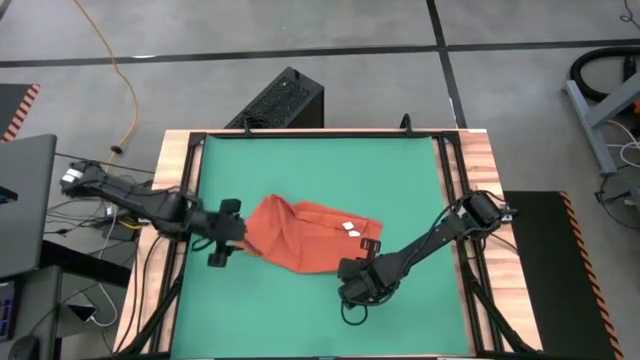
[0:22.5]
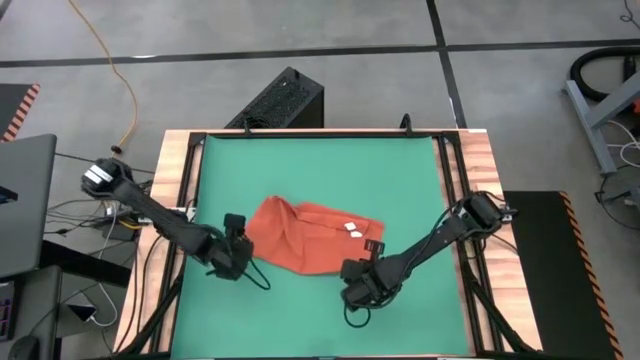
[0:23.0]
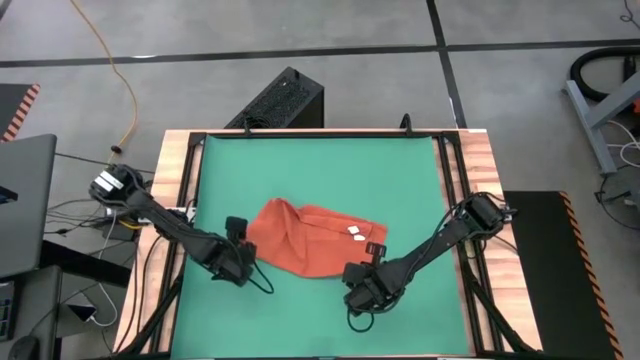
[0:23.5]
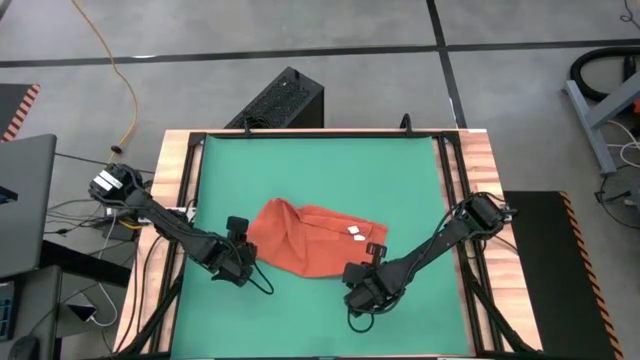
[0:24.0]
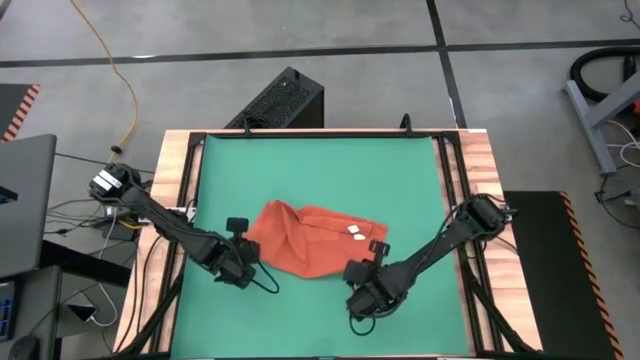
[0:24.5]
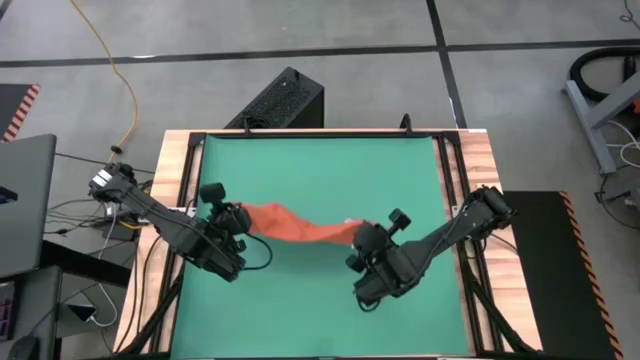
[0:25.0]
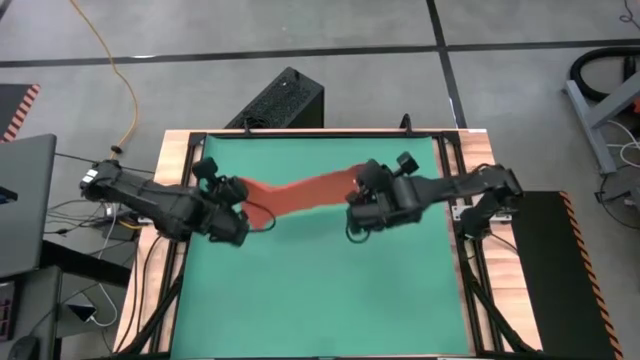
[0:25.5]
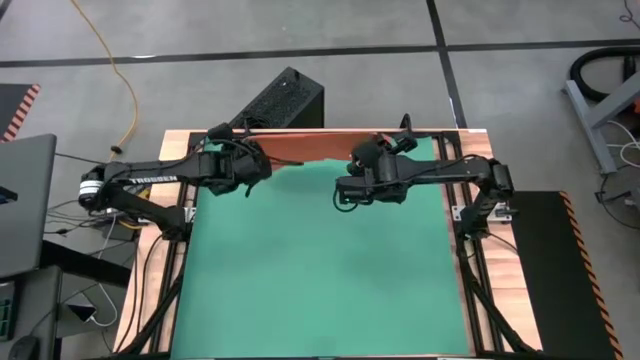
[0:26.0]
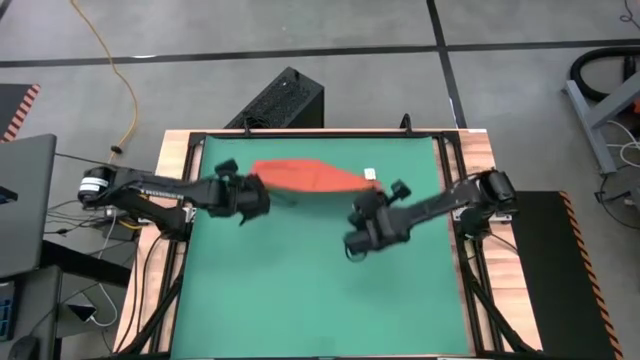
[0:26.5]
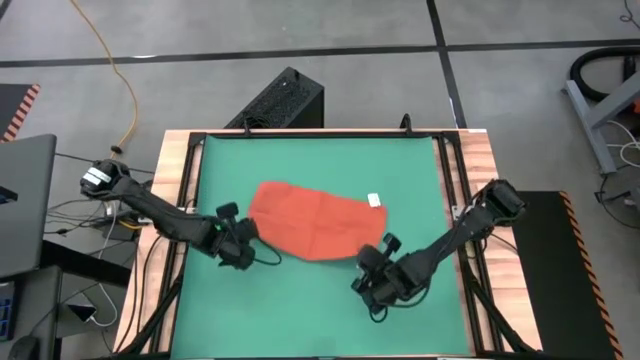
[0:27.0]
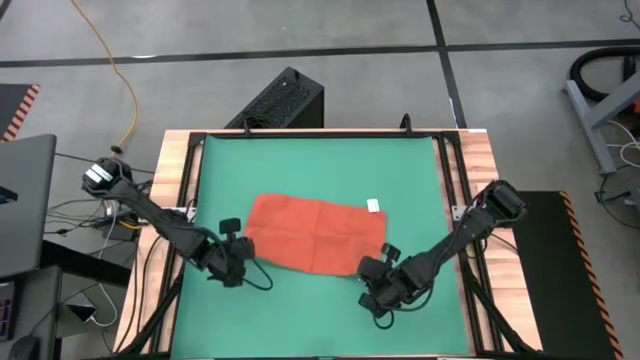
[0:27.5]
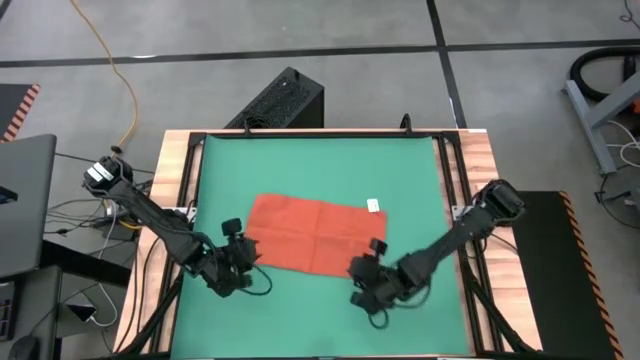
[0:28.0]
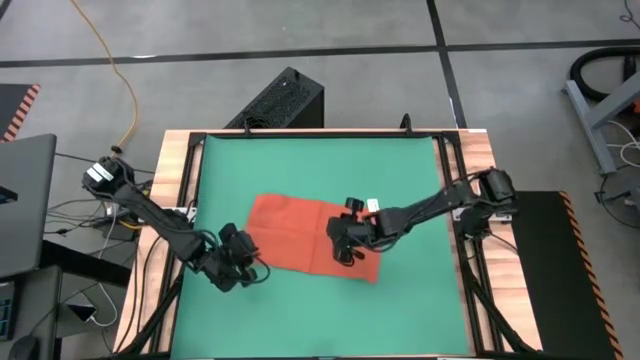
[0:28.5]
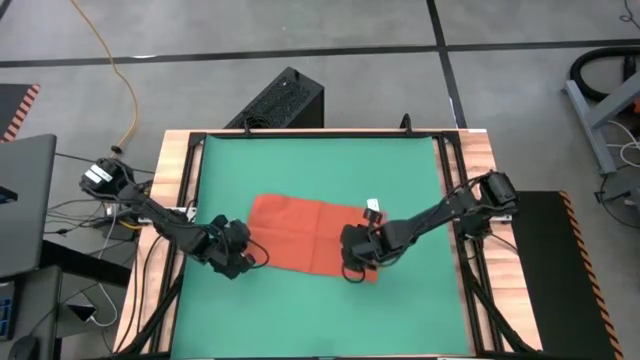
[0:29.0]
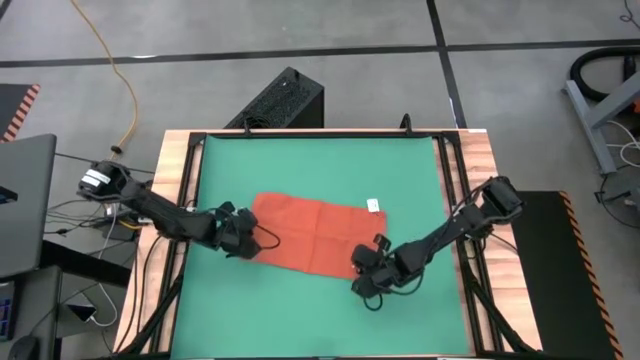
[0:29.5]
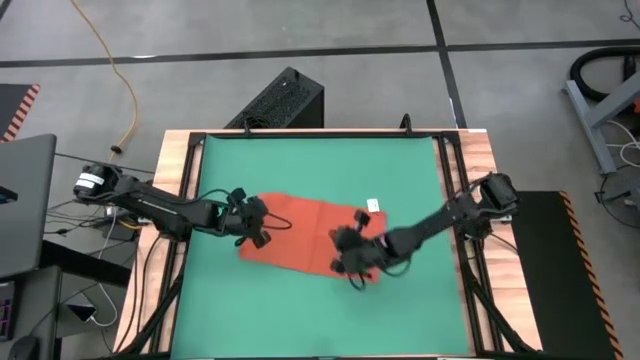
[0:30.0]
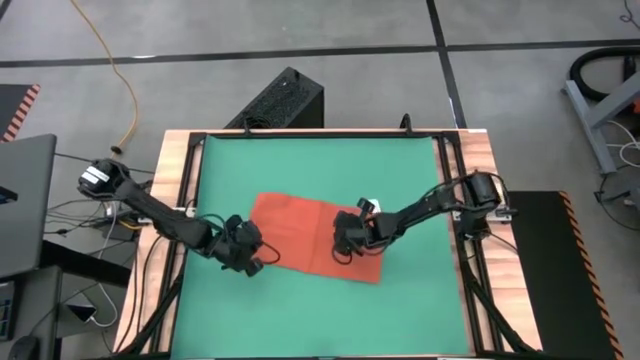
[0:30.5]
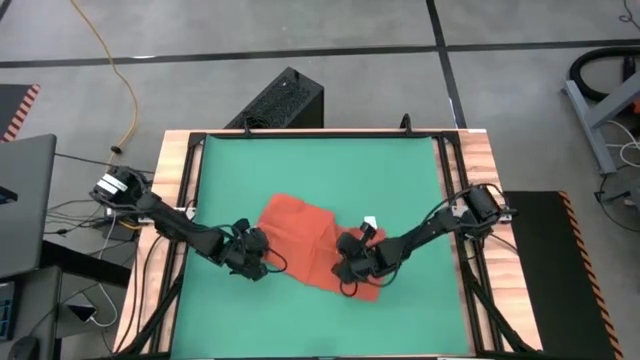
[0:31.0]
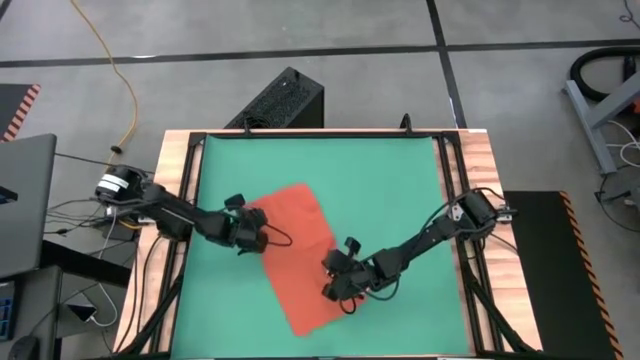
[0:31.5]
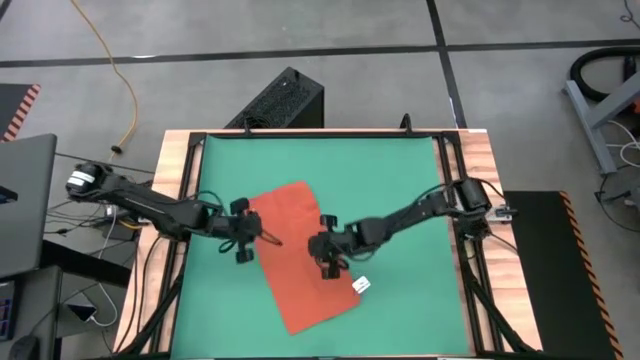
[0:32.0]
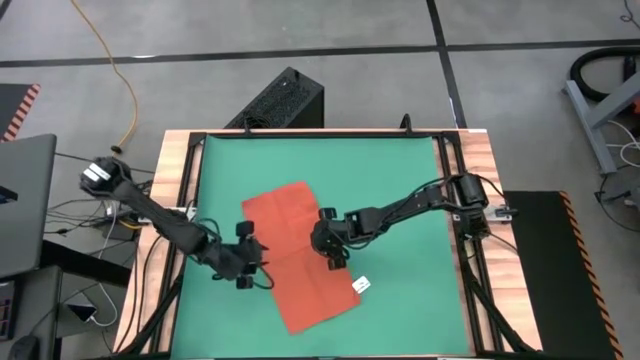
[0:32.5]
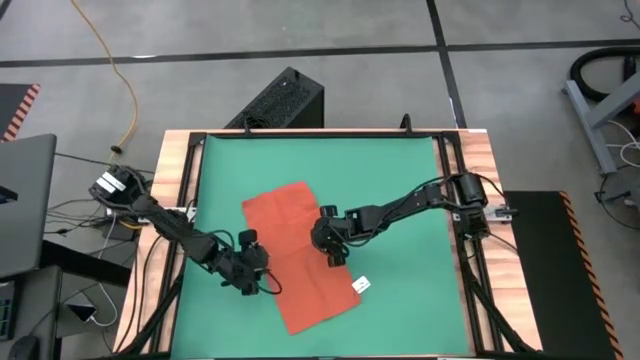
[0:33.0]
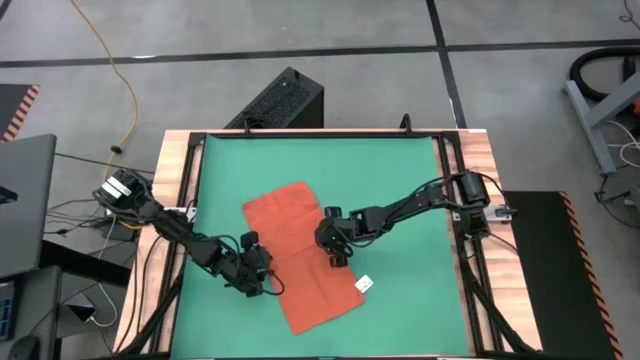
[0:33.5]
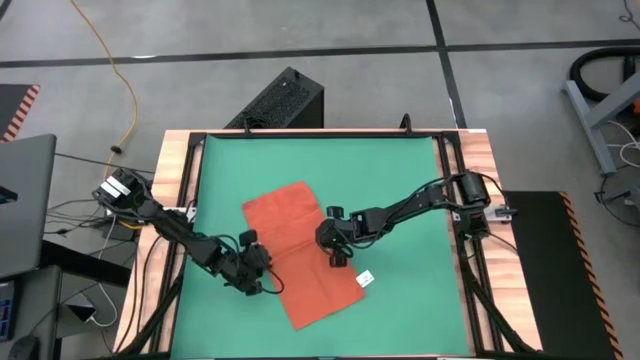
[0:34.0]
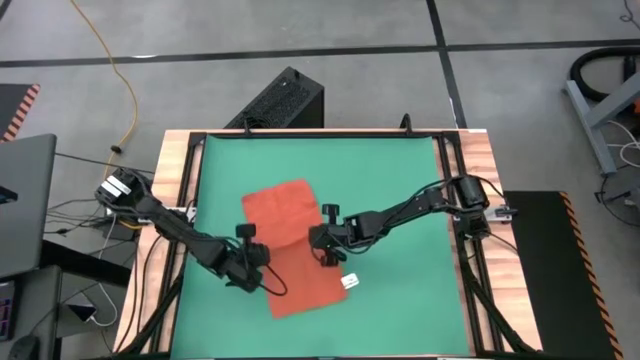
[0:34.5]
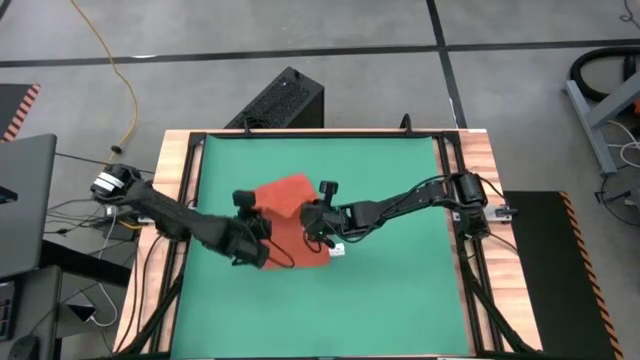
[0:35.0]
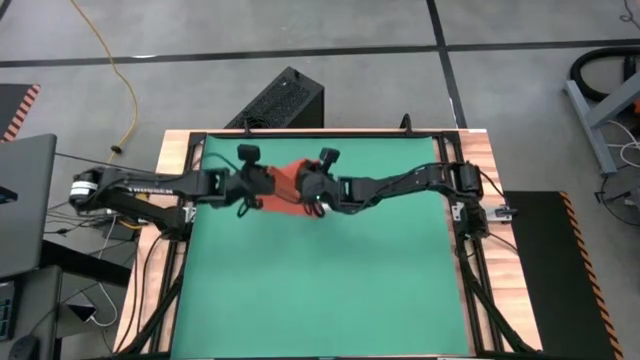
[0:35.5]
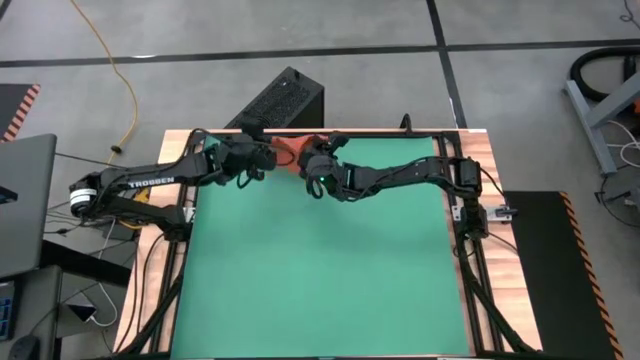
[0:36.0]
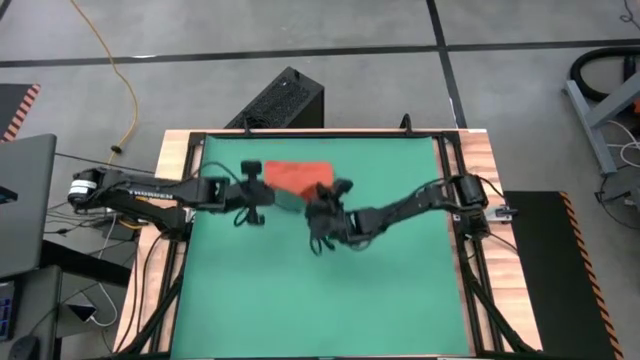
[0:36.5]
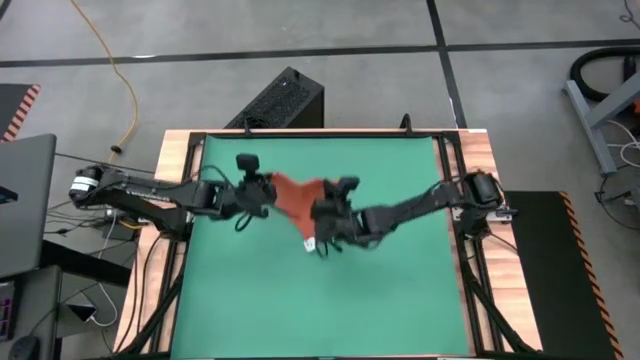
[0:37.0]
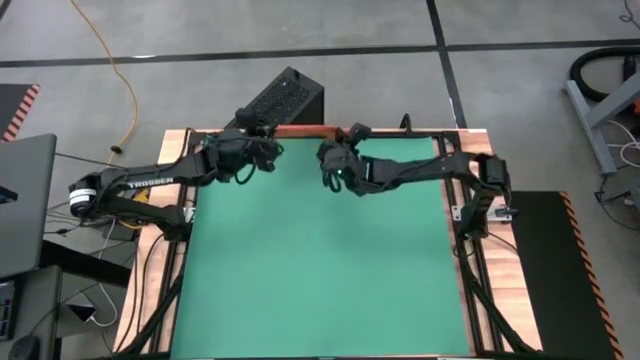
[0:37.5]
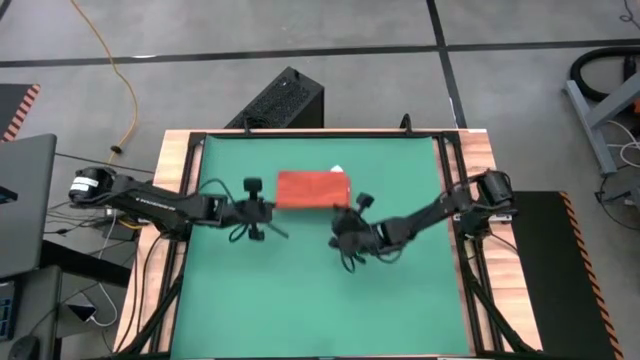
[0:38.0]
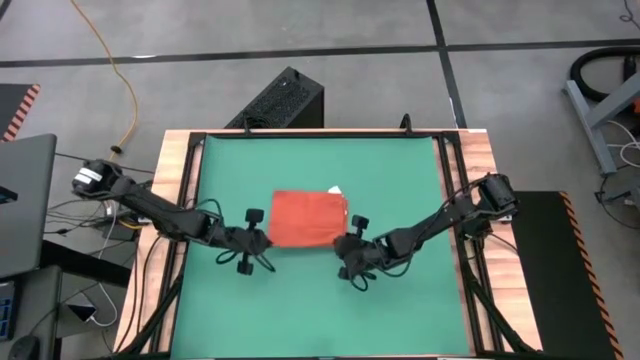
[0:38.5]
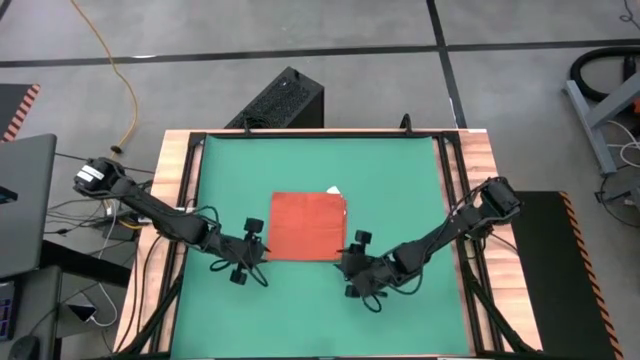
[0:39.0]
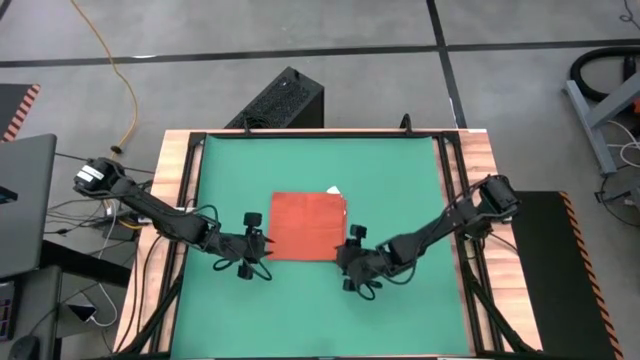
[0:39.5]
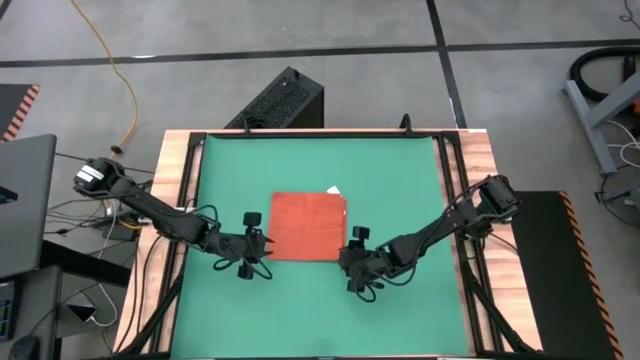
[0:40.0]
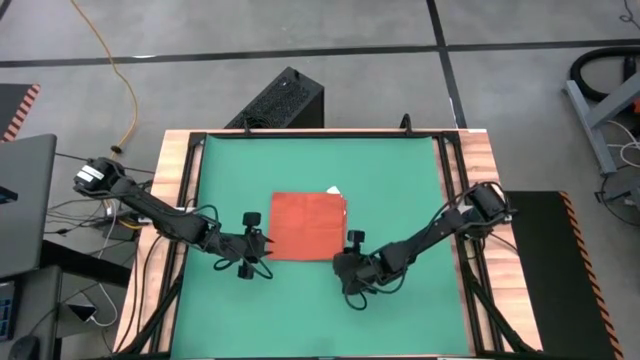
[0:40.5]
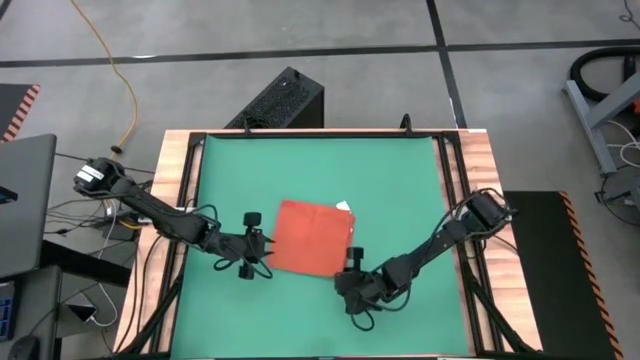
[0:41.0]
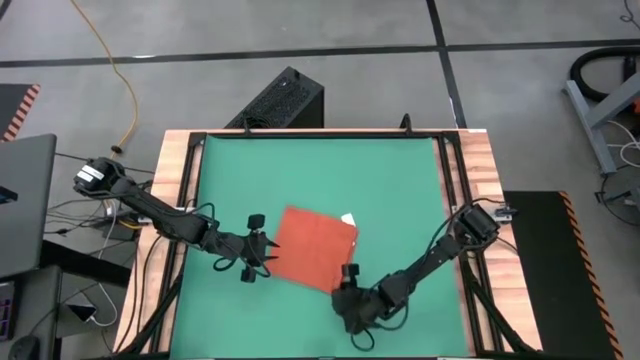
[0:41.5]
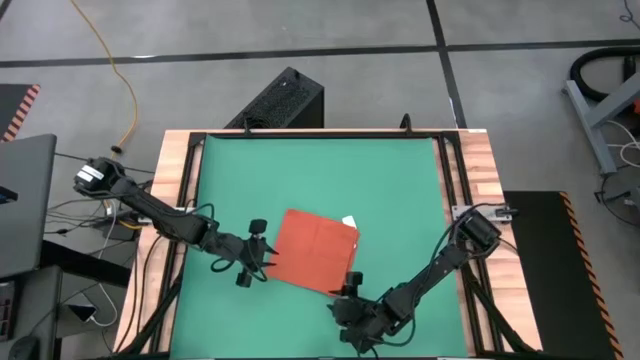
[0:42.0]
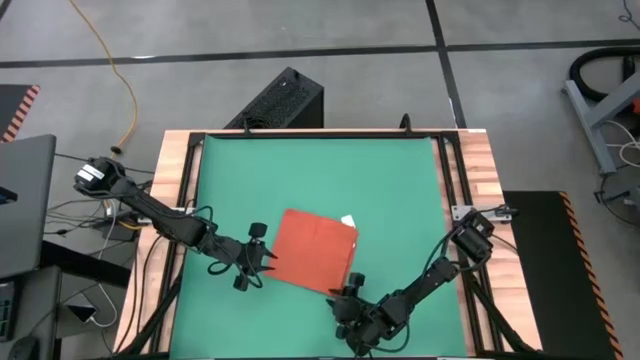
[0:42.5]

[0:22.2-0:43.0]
Task: Roll towel into tight, uniform cylinder
Roll the orange towel

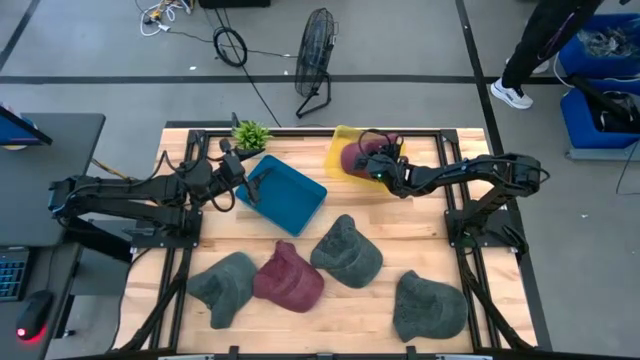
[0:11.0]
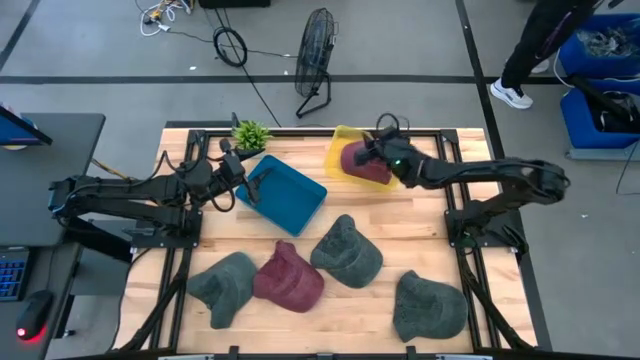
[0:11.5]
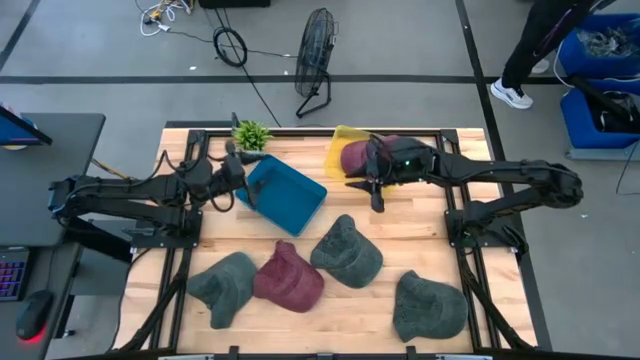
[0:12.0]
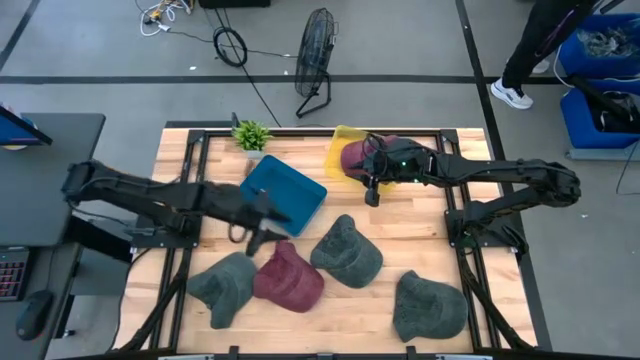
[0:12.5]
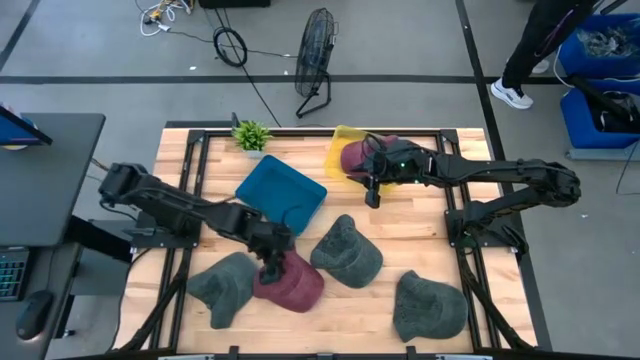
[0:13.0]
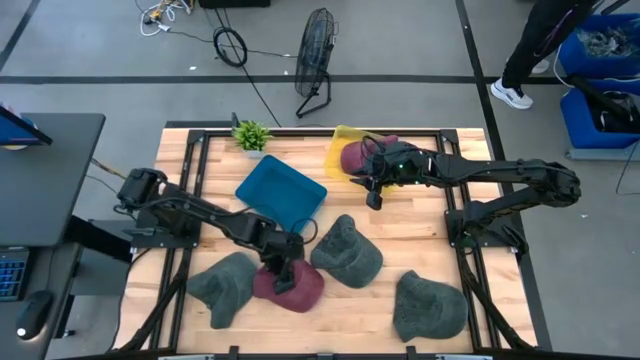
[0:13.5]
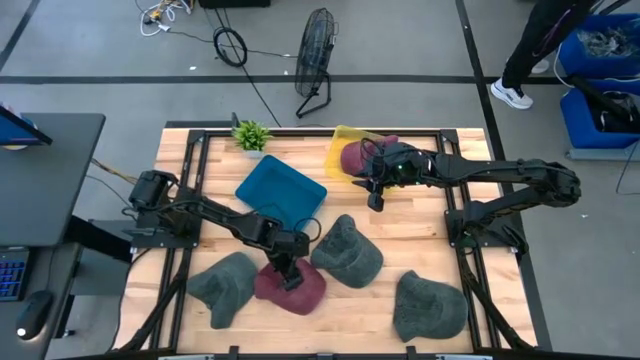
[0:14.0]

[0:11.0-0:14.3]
Task: Pick & Place hat
Put the red cap into the yellow bin
